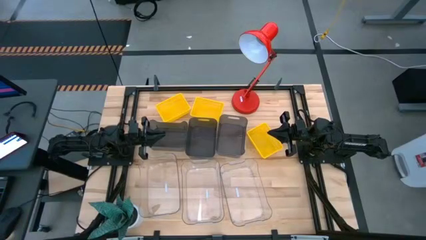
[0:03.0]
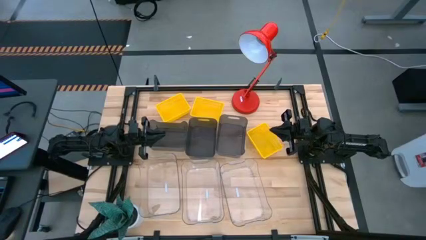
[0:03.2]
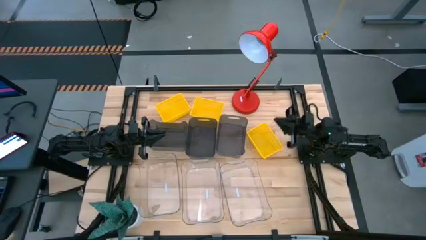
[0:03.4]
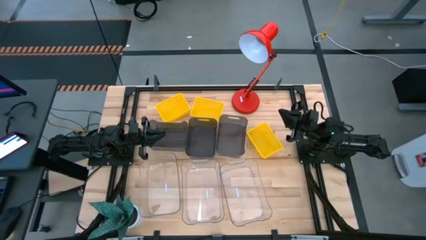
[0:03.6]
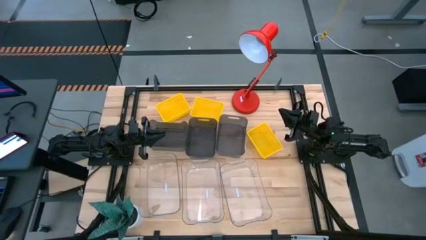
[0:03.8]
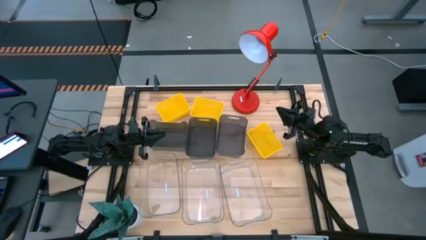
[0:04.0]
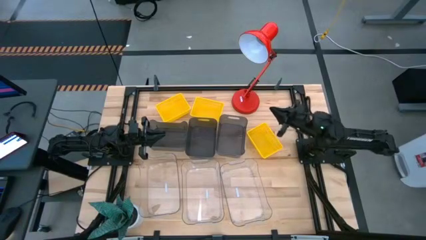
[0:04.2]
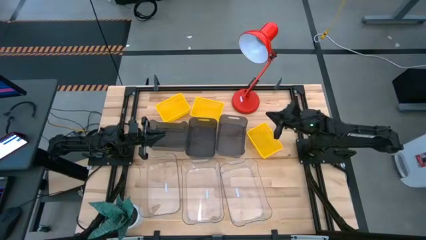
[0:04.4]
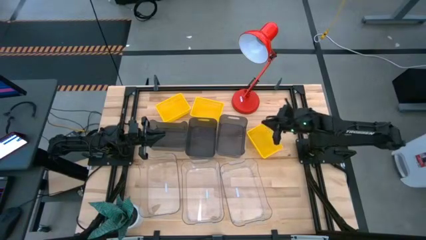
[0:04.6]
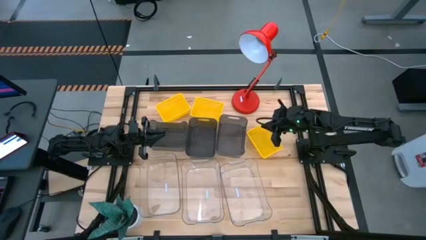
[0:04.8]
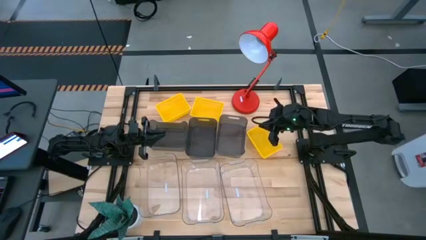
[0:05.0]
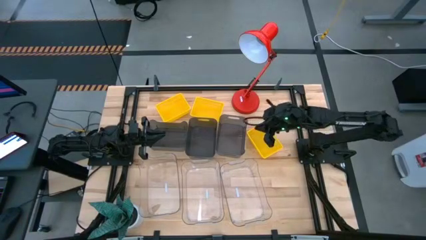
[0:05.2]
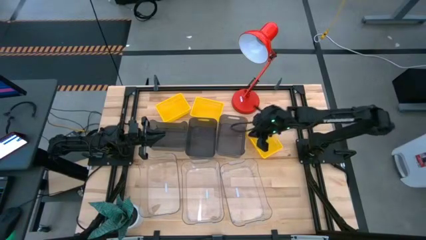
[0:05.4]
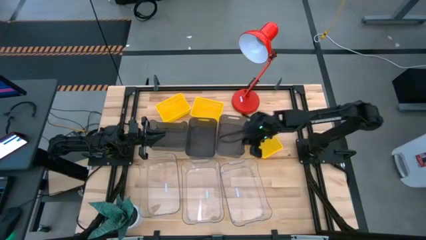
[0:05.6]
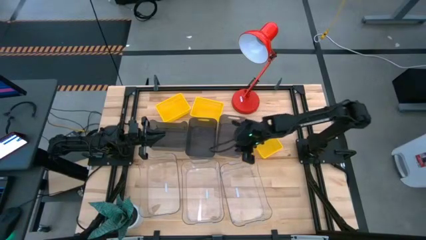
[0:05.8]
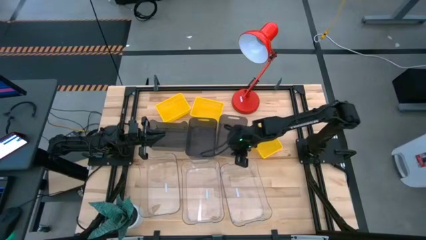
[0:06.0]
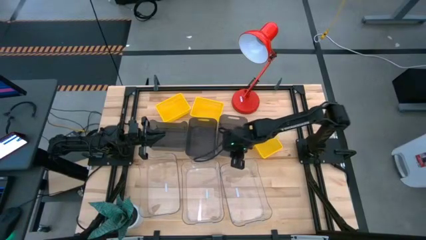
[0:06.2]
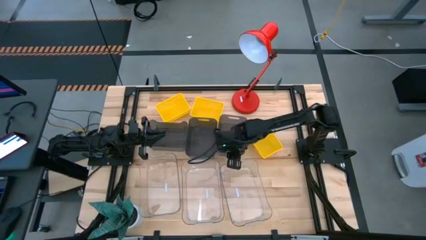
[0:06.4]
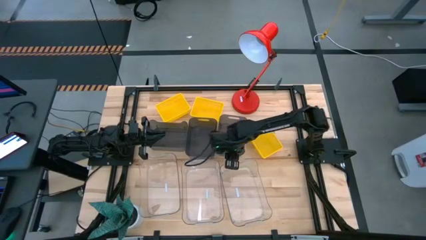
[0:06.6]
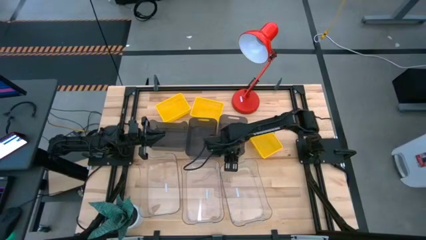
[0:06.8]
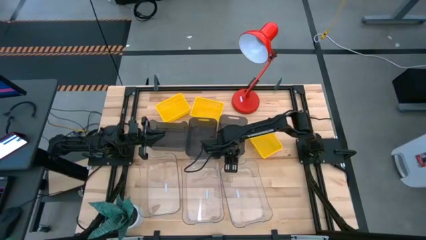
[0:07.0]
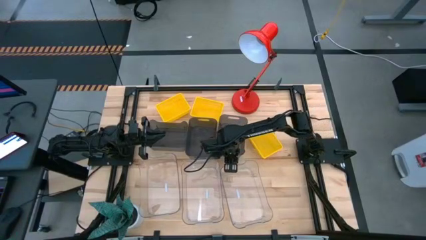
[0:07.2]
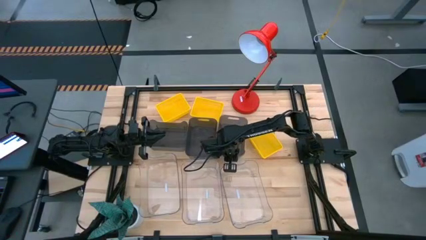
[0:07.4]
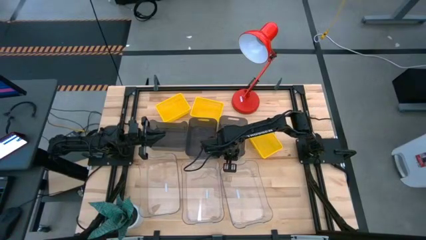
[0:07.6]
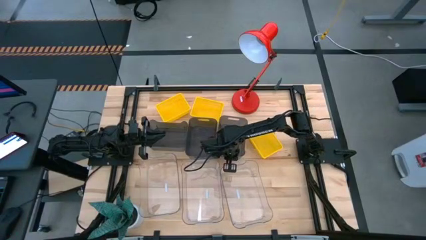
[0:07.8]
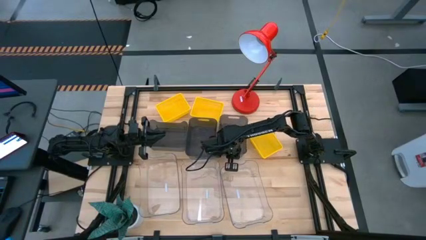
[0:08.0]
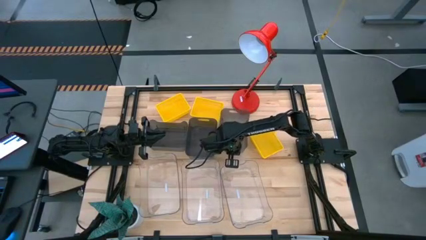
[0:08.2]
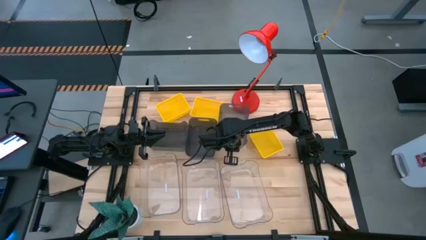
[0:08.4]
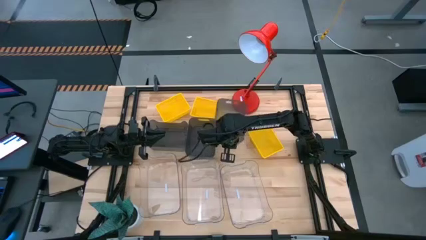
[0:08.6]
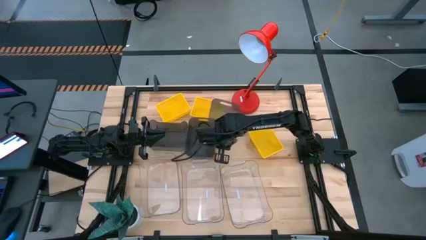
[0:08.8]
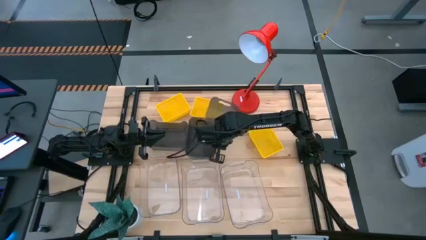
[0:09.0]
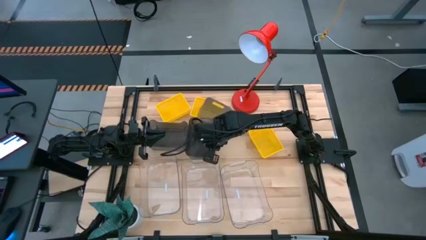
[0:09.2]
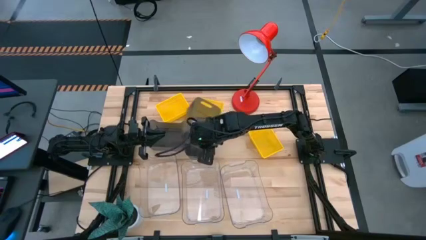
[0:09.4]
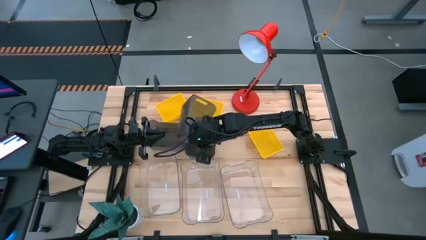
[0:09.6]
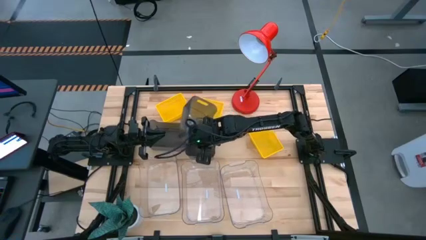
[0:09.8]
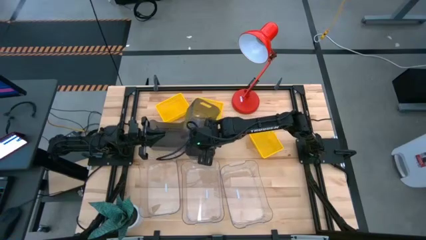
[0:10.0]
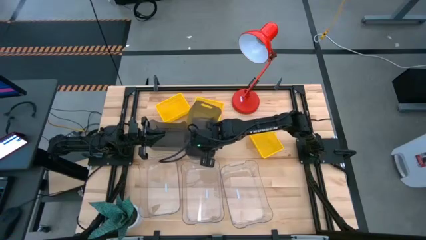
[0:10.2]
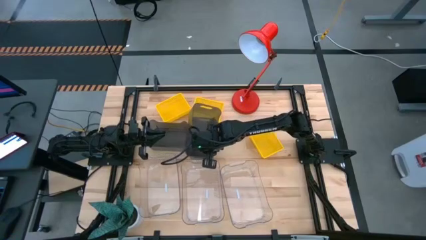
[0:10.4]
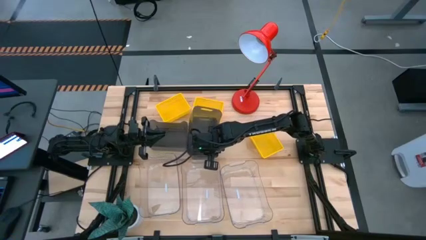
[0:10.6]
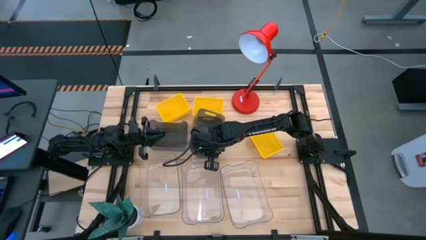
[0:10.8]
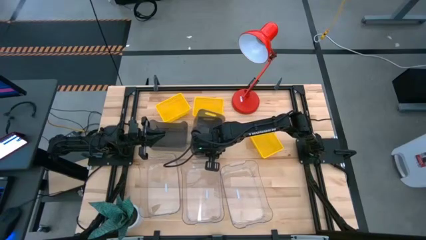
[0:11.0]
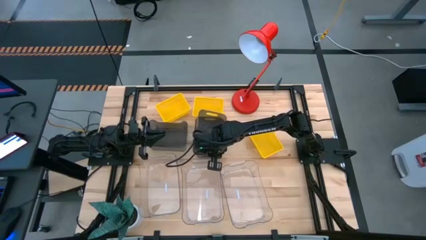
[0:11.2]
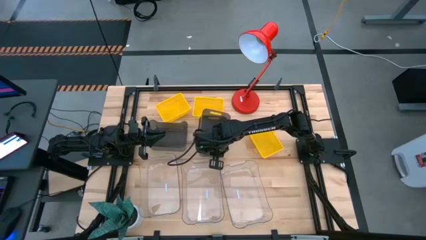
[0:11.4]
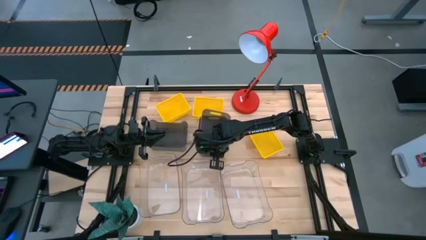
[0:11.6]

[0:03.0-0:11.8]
Stack the right black bin on top of the middle black bin

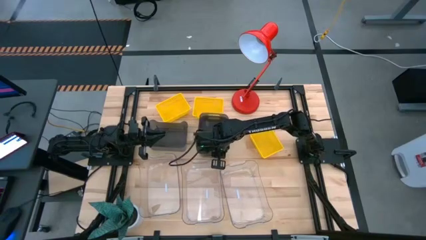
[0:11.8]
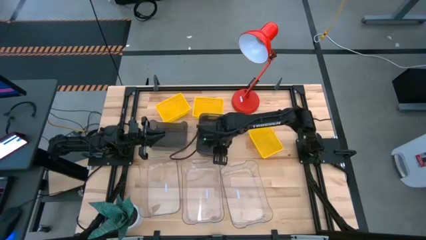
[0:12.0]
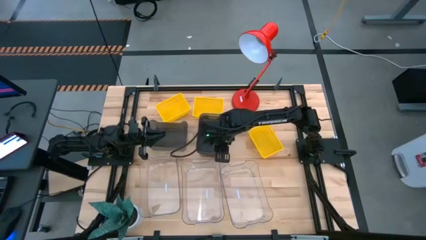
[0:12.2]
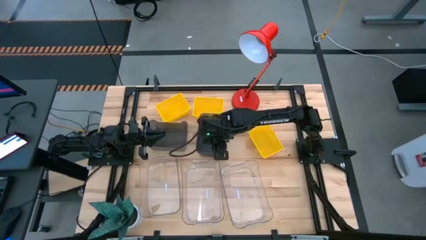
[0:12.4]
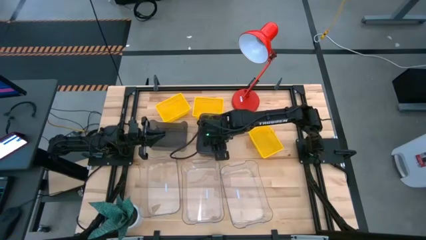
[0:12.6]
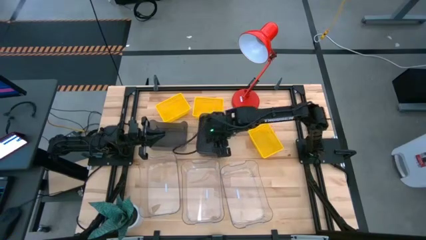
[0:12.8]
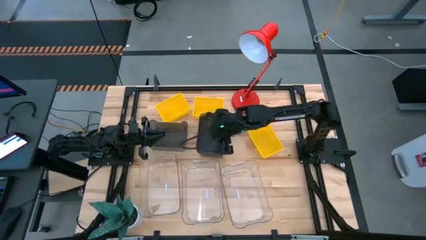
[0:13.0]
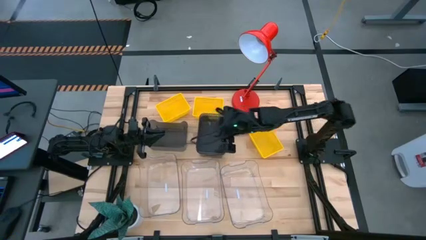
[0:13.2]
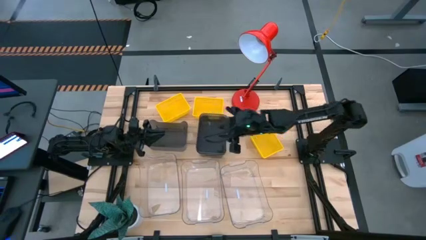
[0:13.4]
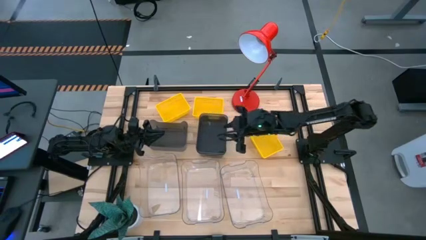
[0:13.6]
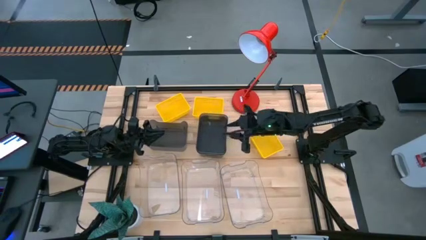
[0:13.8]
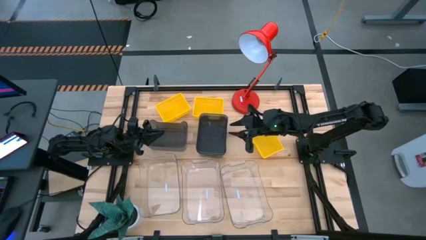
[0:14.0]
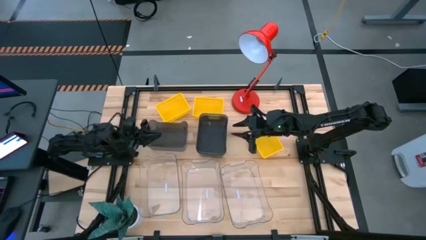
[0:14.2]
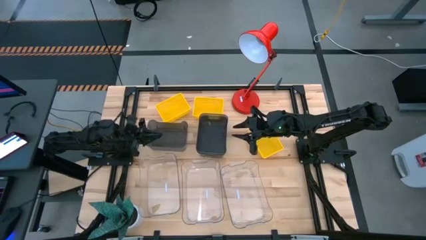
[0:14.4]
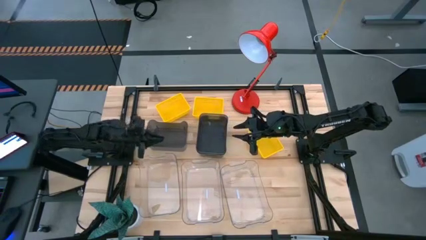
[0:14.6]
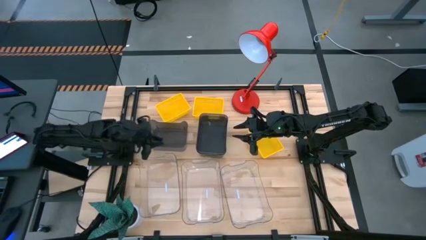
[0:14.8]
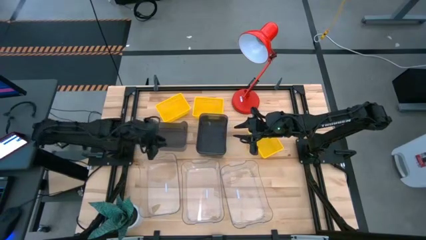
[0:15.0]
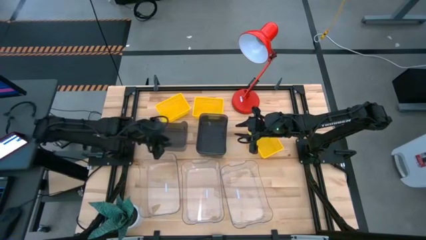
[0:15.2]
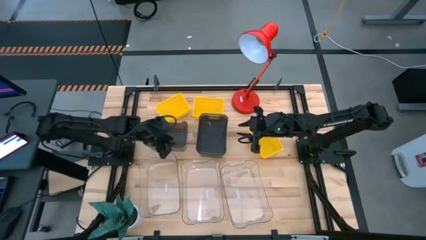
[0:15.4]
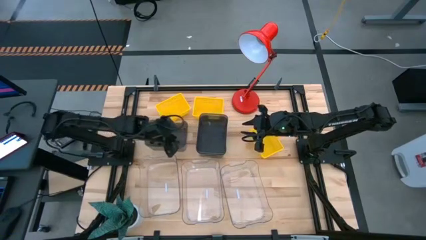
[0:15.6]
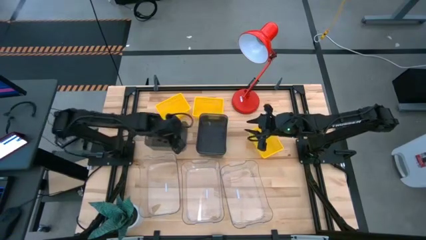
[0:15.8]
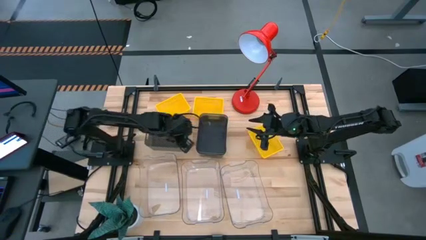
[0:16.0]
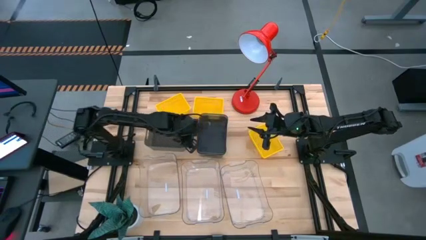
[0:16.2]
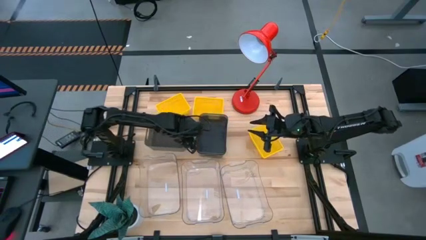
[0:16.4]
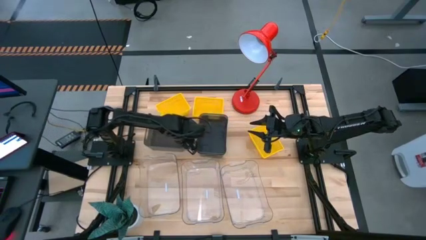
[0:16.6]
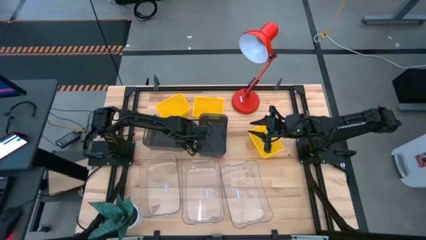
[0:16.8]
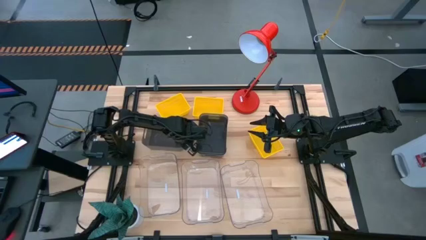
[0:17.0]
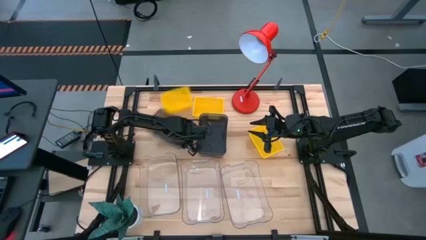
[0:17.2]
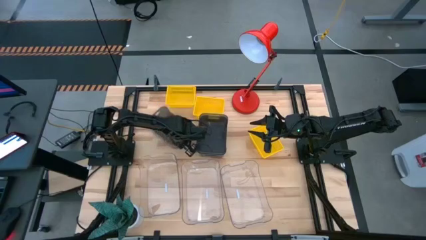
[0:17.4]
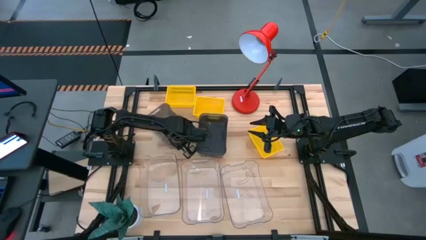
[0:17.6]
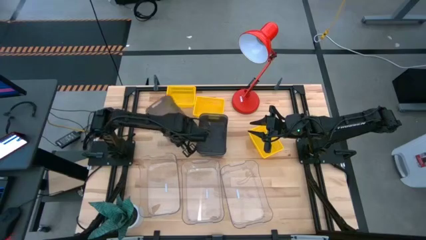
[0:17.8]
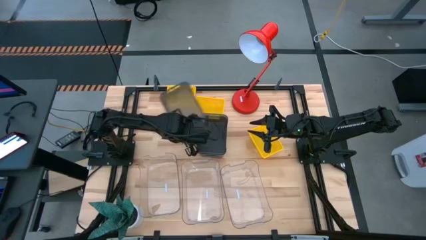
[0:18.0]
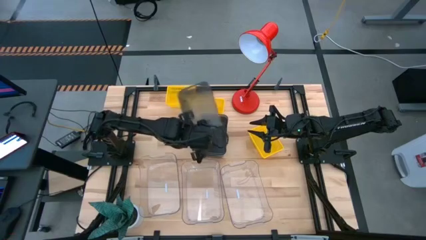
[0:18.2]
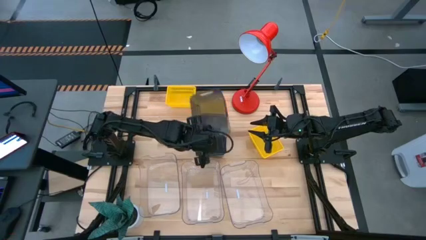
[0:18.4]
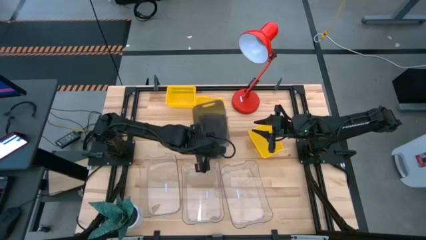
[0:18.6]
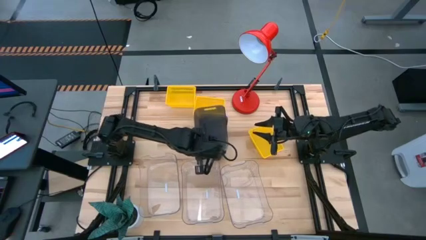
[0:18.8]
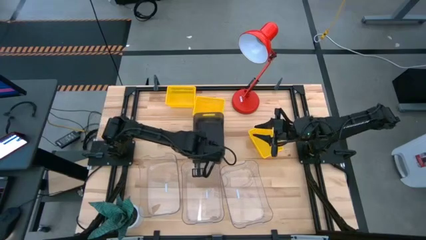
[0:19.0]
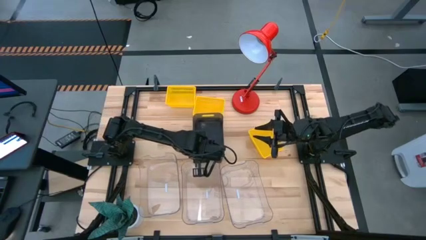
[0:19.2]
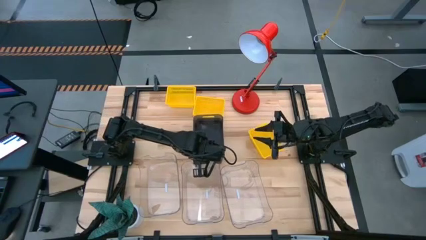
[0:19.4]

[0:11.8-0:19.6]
Stack the left black bin on top of the right black bins
